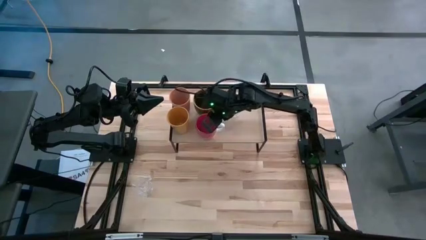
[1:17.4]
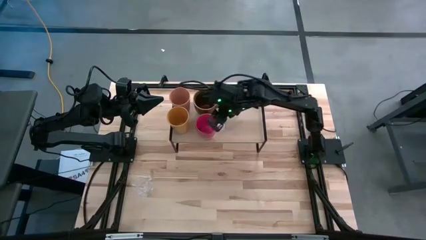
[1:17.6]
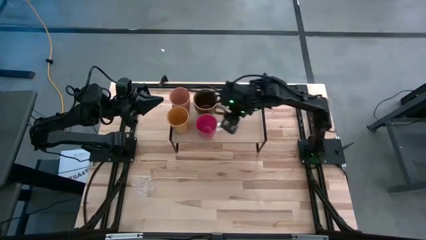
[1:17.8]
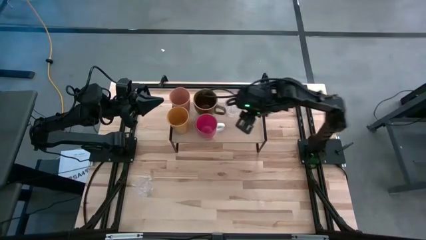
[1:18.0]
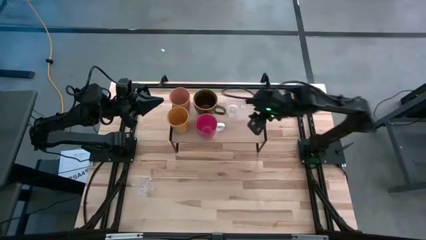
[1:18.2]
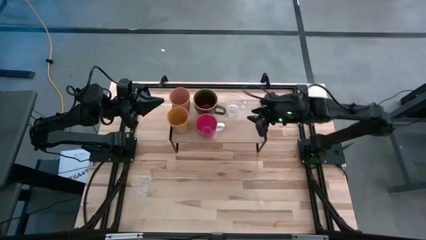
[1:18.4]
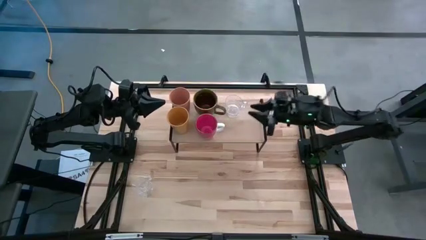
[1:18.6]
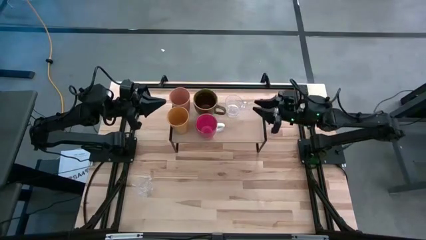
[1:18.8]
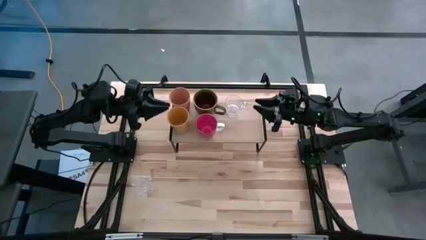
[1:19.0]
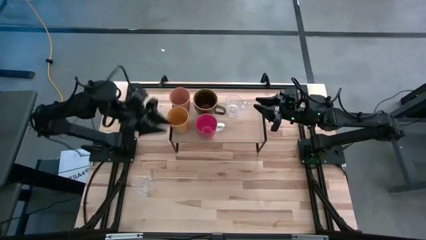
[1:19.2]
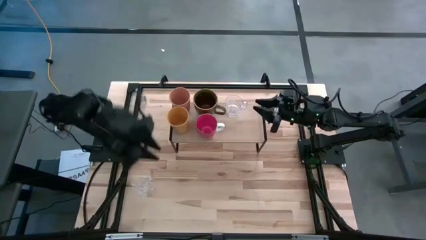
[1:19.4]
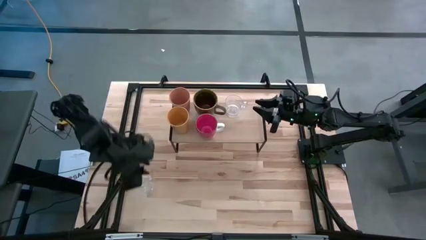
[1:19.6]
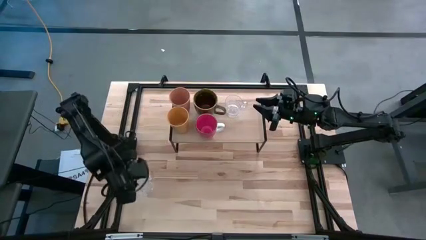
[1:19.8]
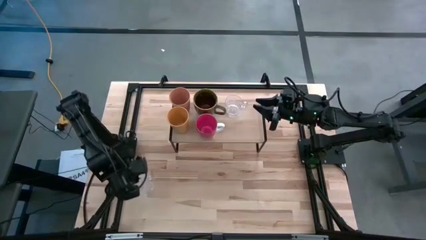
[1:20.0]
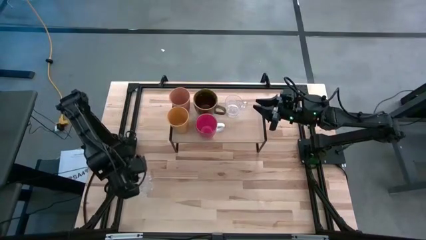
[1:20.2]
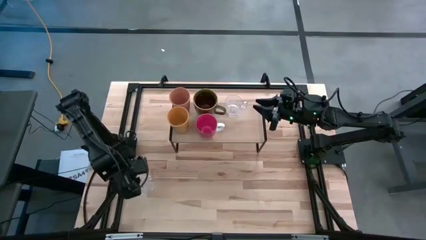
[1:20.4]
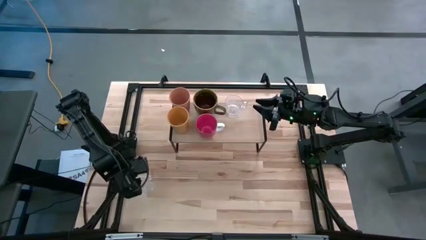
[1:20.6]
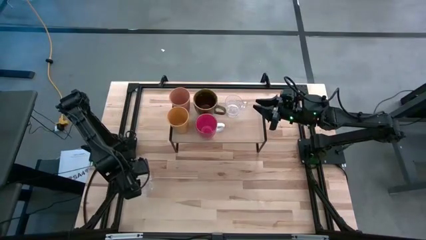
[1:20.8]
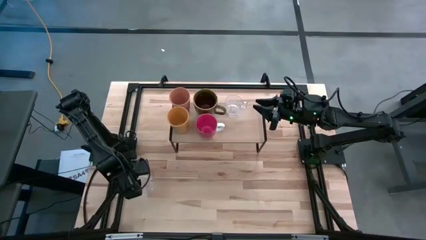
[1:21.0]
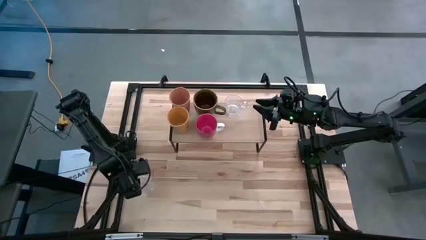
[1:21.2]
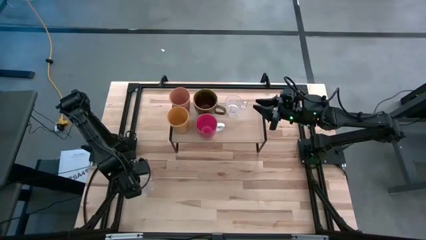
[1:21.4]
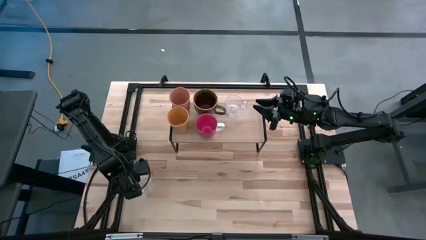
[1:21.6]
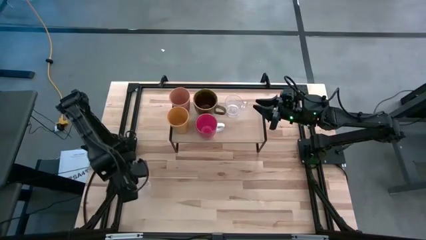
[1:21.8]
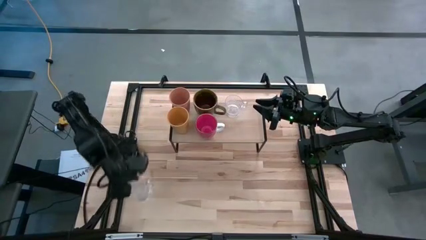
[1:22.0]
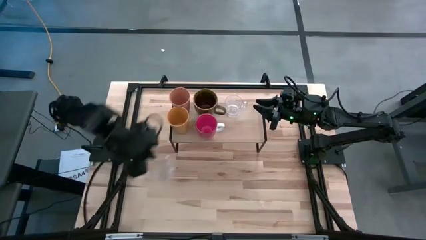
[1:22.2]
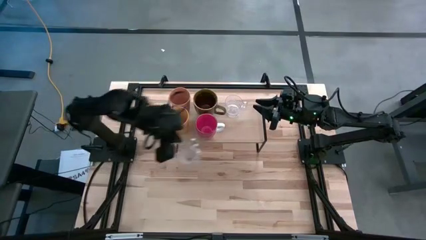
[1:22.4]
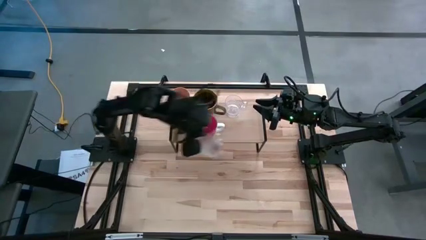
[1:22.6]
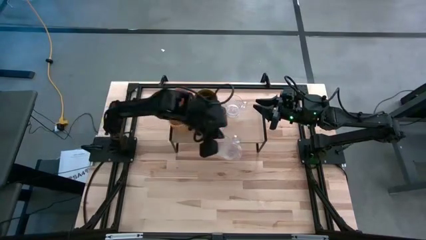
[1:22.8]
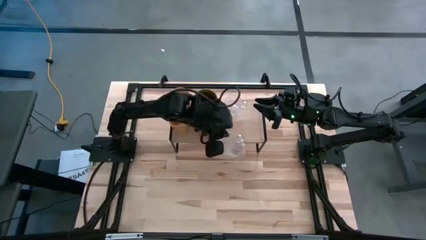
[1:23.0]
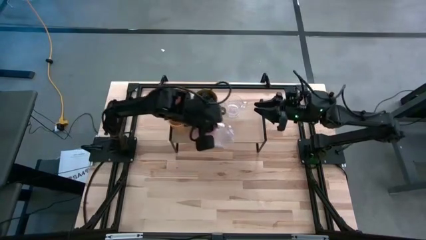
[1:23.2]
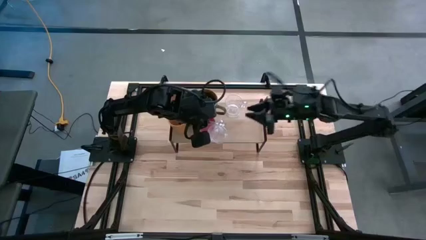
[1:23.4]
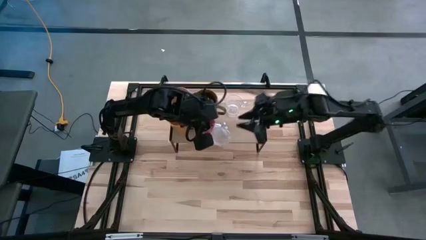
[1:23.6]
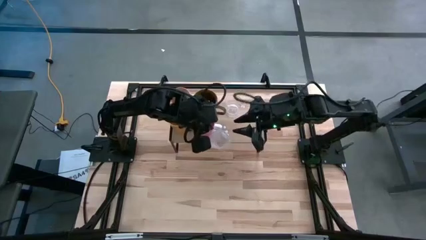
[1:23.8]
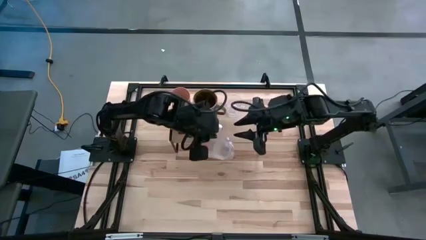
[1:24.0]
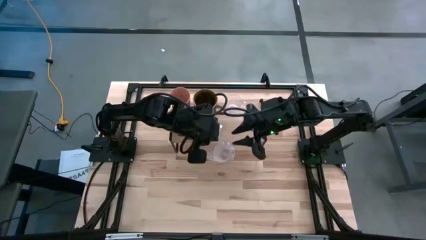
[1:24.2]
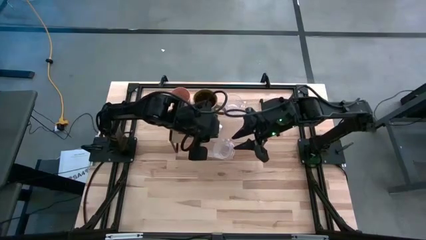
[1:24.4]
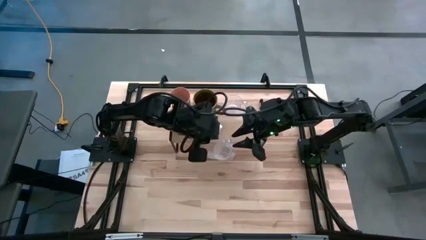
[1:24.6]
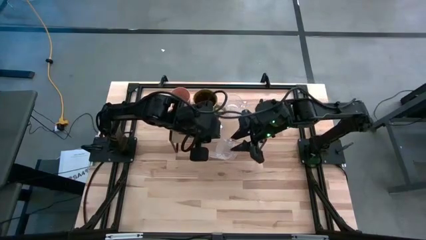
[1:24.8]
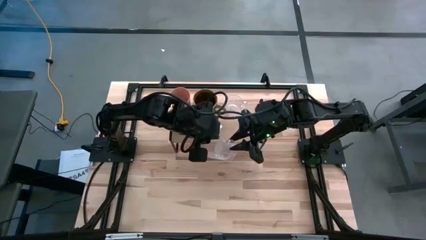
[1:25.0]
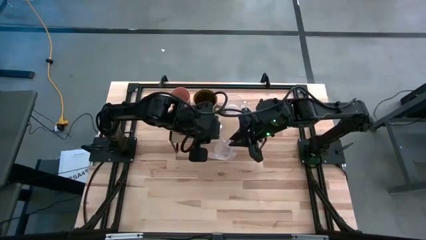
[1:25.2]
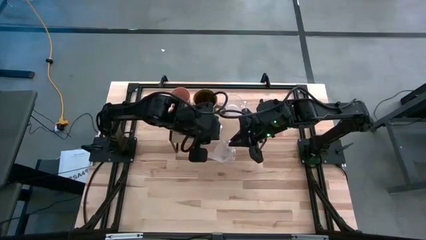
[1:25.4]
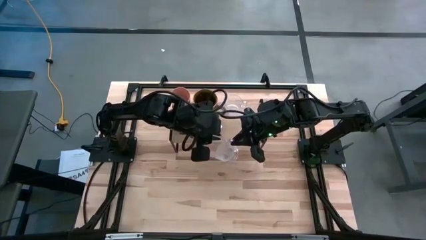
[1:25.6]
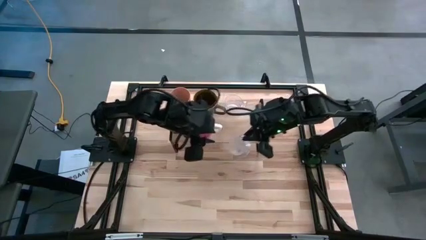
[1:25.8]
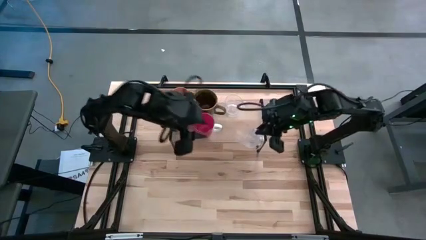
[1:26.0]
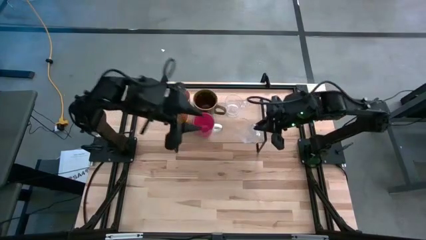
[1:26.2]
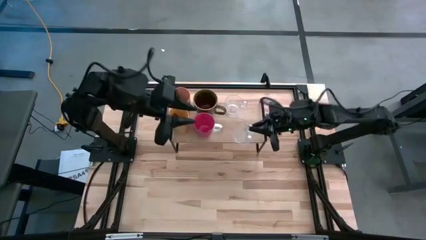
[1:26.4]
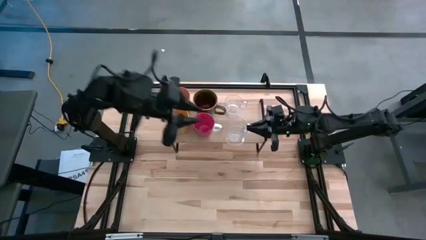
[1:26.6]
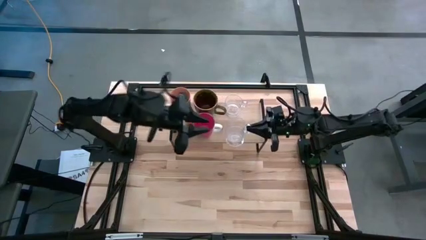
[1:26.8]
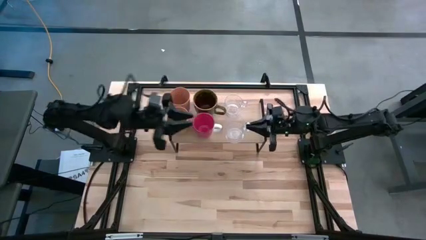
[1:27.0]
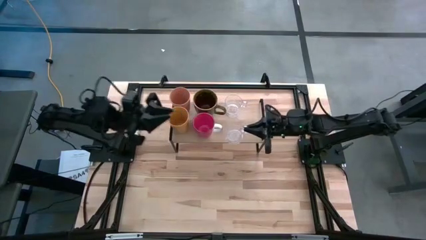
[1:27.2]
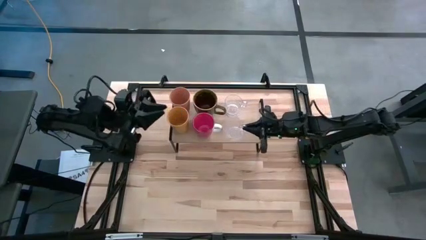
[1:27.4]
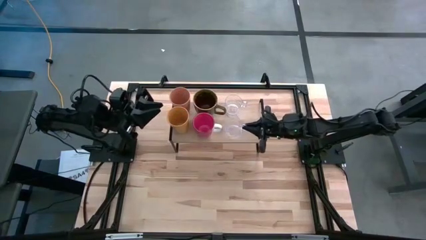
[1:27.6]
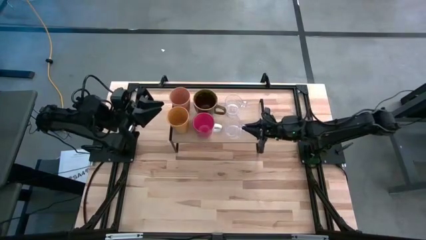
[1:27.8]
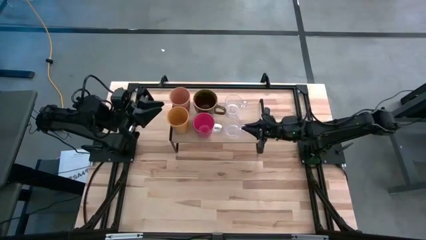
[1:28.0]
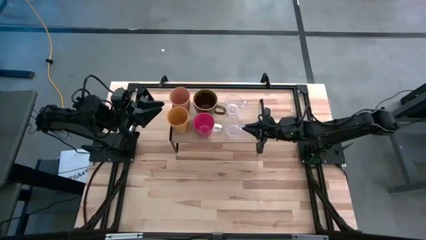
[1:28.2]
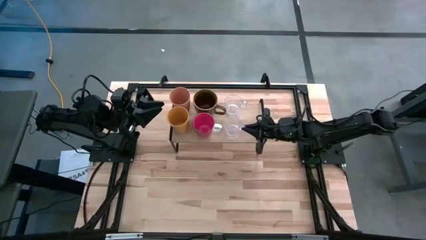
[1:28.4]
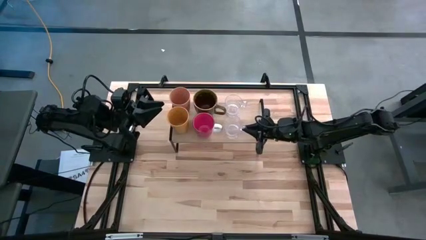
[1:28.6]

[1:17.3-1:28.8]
Task: Stack small to large cups/mugs on shelf
Put the transparent mug on the shelf

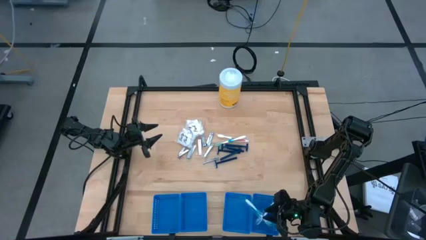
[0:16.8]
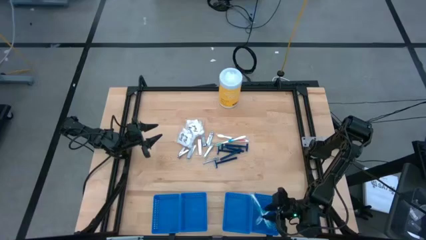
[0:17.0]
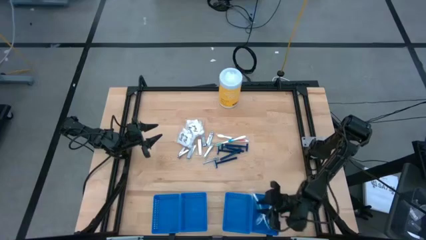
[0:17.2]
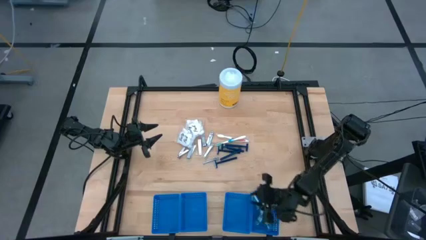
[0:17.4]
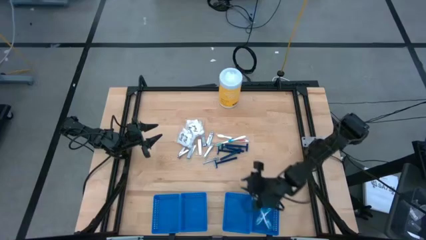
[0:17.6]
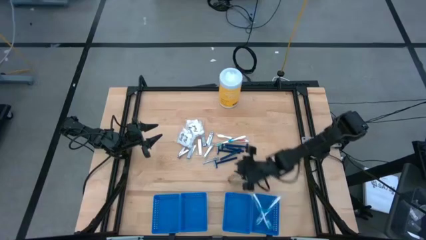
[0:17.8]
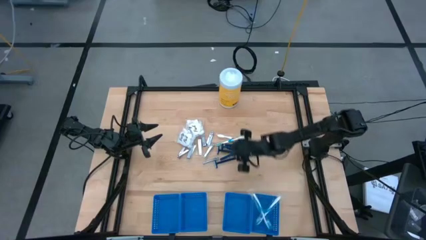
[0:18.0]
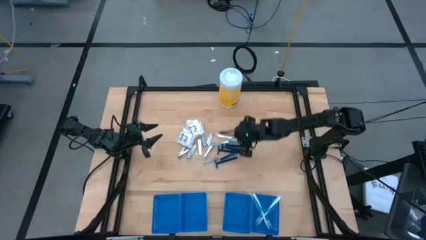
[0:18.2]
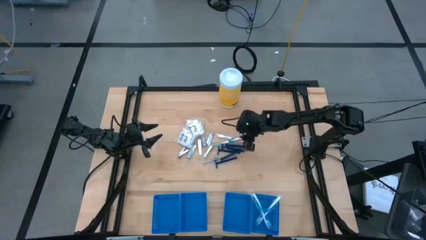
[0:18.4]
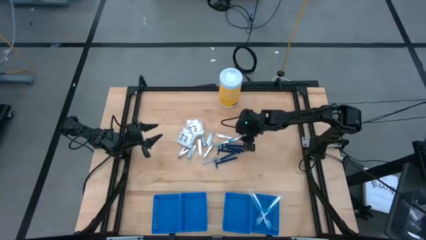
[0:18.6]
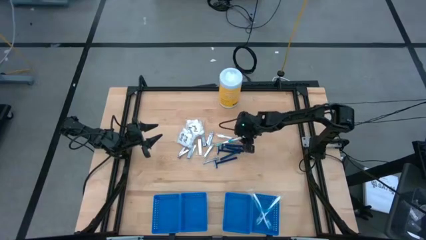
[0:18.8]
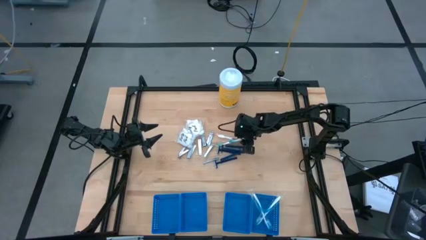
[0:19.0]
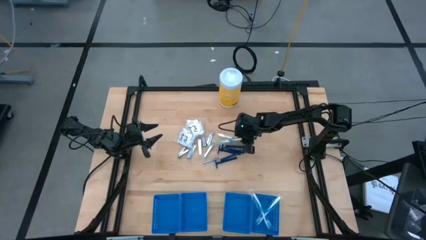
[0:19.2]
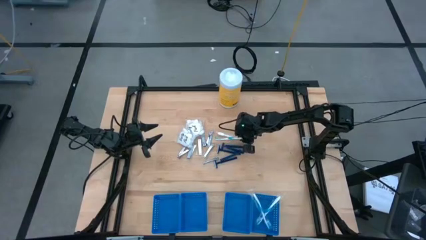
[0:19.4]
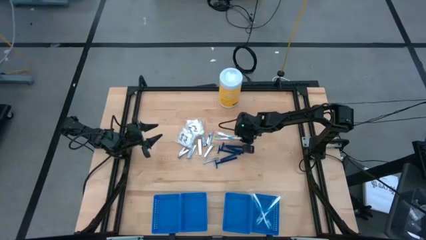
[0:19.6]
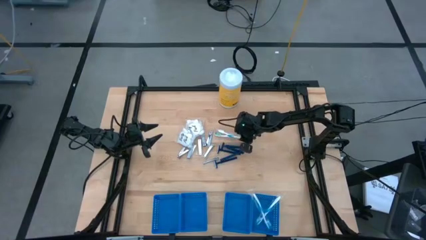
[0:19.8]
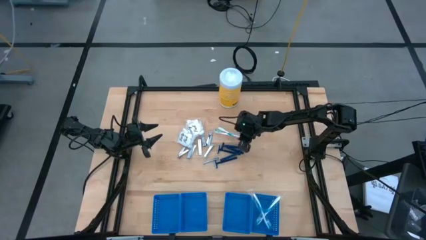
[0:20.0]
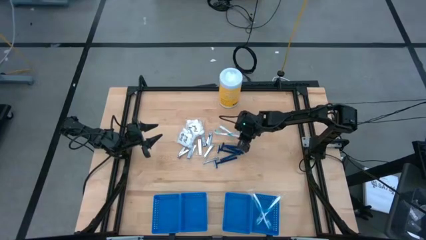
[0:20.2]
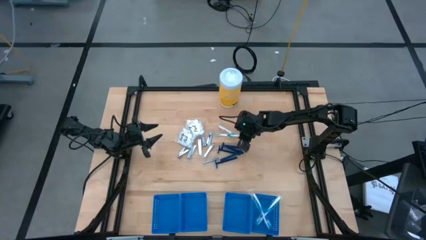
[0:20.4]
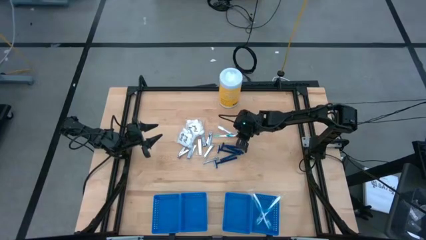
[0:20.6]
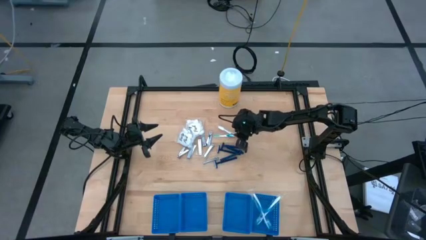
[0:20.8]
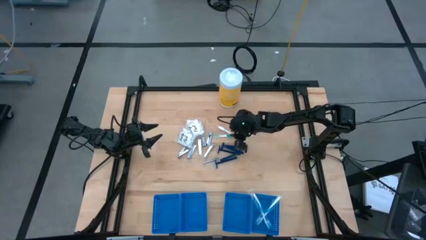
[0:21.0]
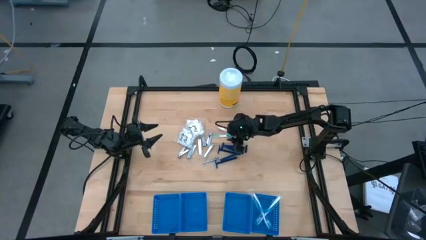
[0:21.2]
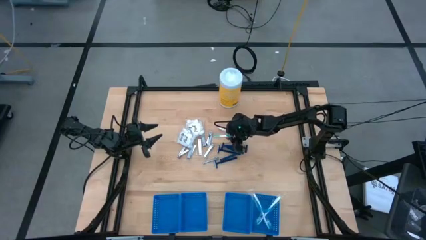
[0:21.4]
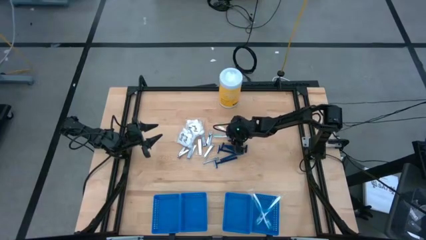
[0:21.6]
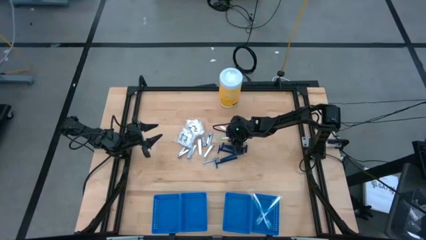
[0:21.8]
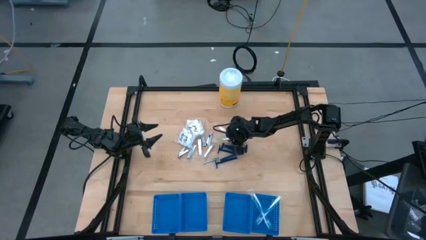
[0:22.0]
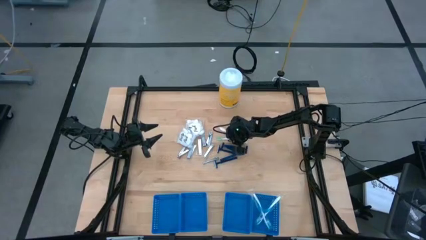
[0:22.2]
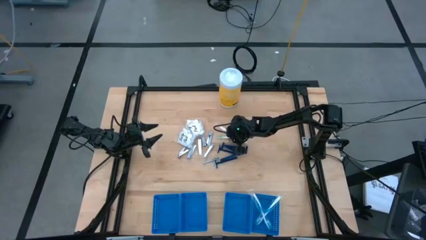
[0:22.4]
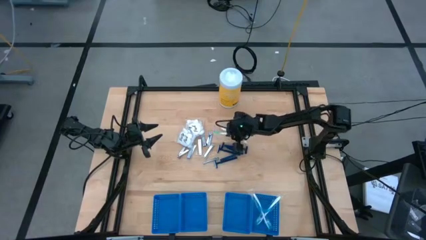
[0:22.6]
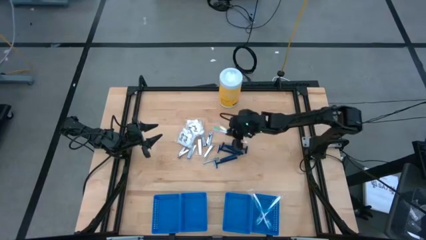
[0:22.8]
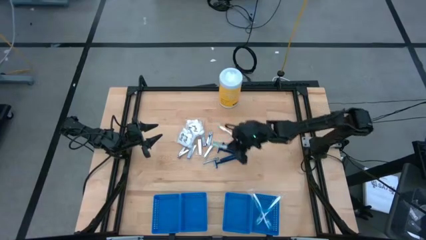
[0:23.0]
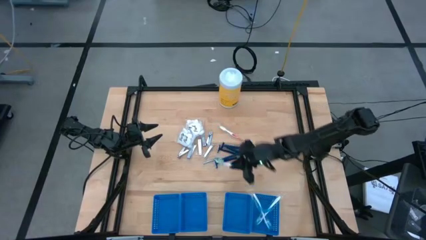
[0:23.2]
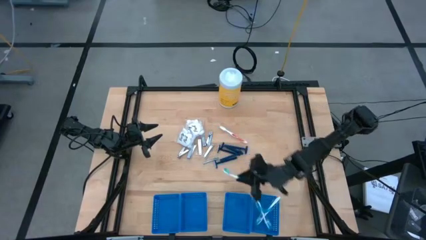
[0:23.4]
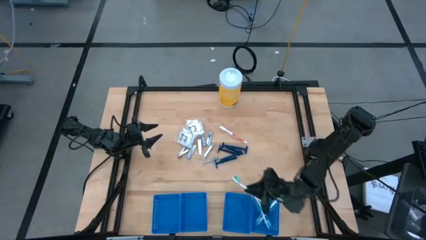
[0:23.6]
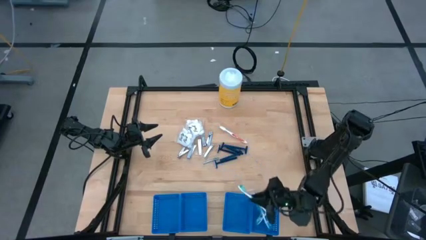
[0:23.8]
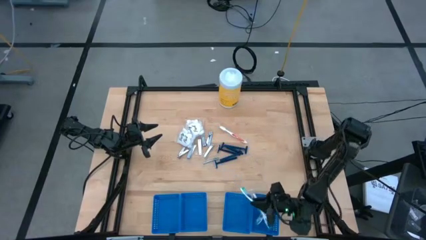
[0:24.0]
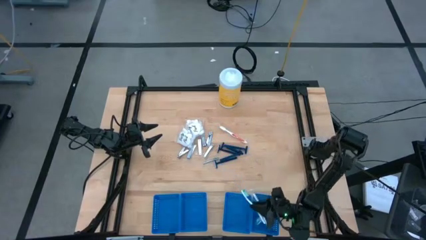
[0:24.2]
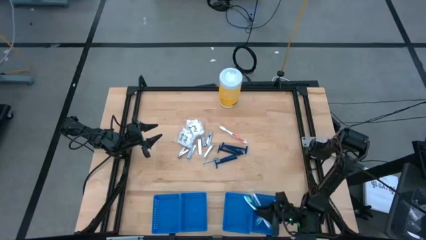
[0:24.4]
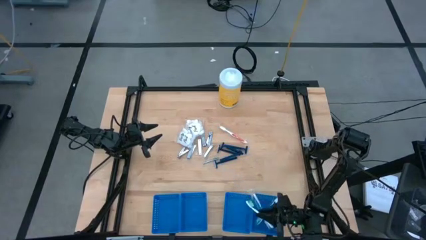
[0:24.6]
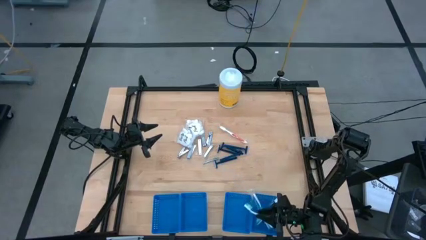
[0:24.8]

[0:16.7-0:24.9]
Task: Pick & Place Travel size toiletries
Put the green toothbrush into the blue basket
